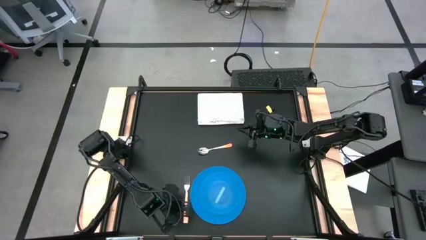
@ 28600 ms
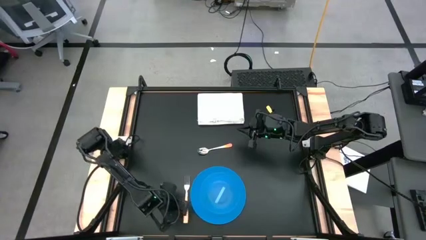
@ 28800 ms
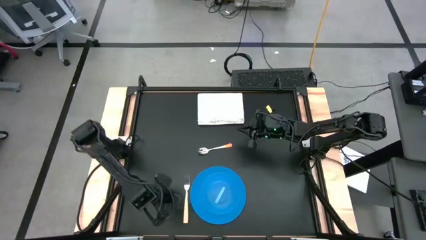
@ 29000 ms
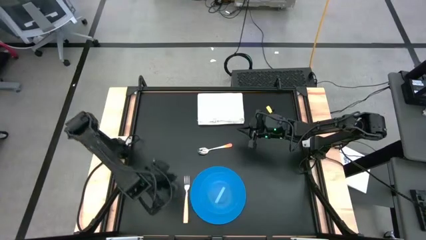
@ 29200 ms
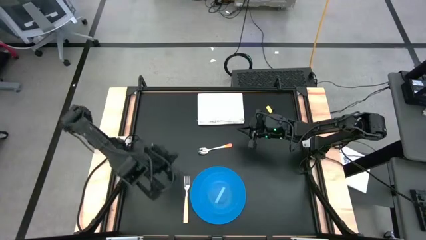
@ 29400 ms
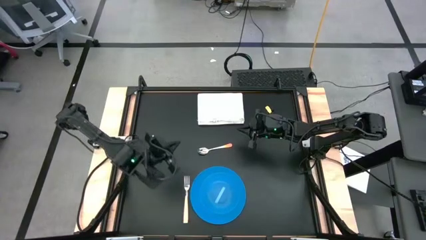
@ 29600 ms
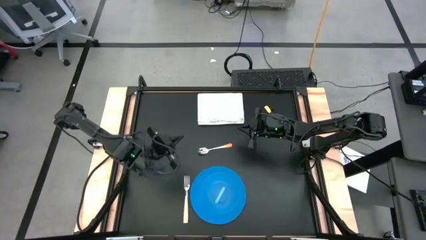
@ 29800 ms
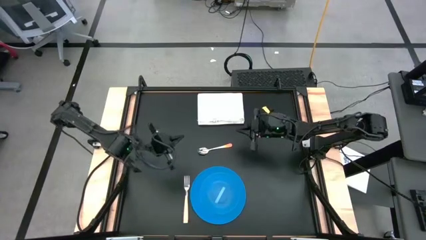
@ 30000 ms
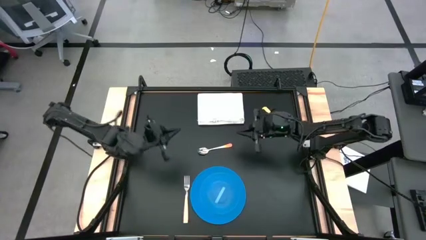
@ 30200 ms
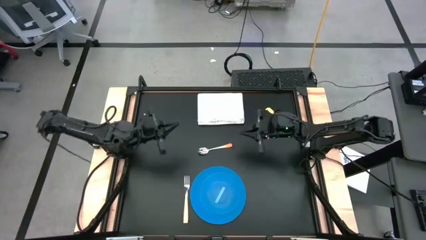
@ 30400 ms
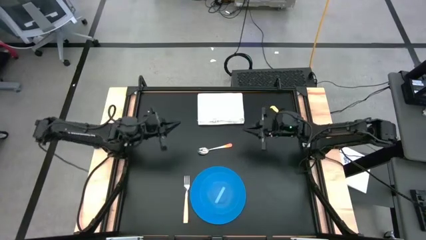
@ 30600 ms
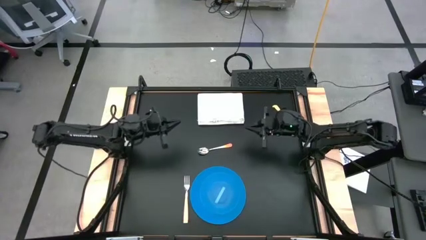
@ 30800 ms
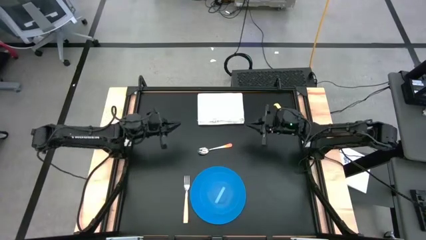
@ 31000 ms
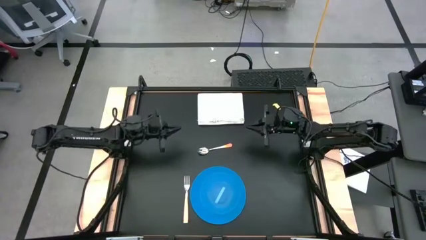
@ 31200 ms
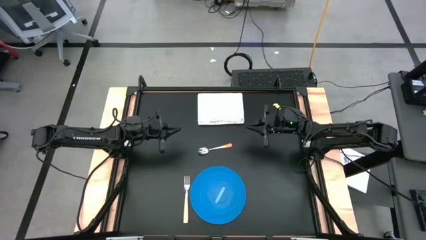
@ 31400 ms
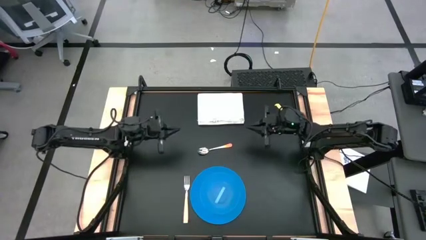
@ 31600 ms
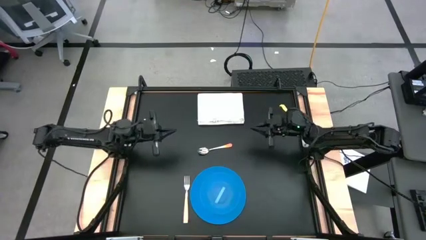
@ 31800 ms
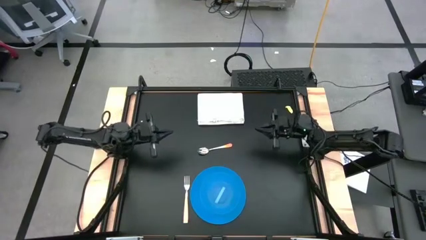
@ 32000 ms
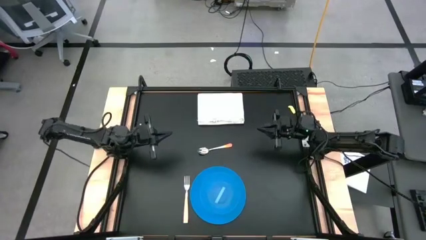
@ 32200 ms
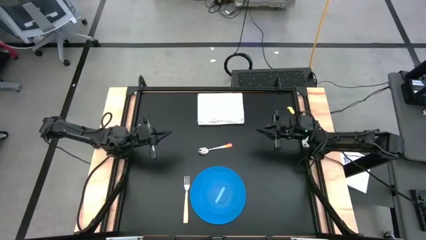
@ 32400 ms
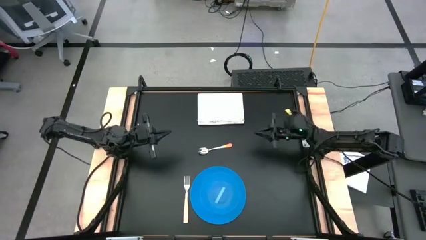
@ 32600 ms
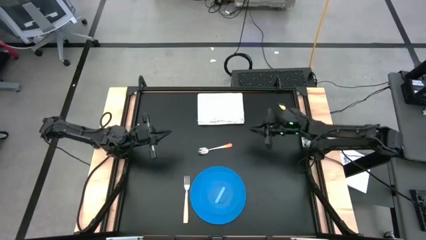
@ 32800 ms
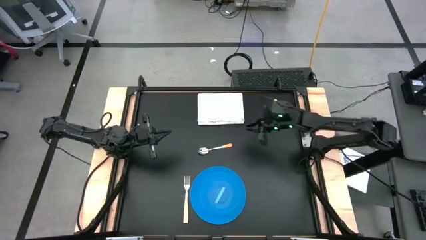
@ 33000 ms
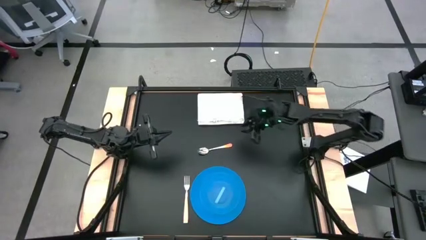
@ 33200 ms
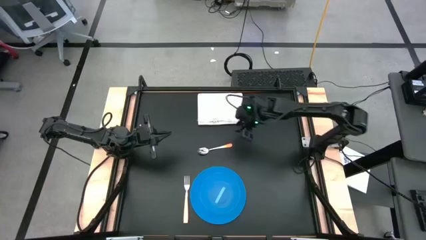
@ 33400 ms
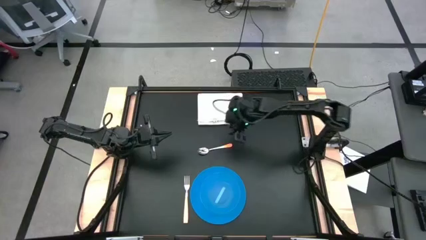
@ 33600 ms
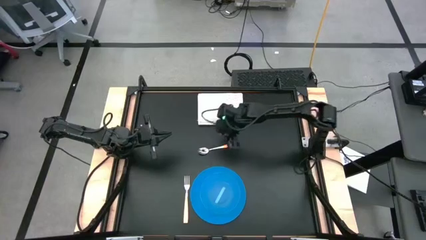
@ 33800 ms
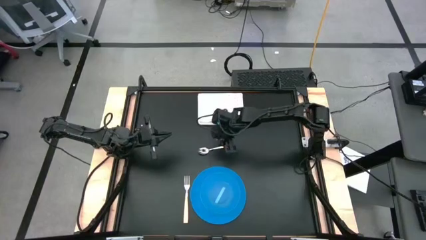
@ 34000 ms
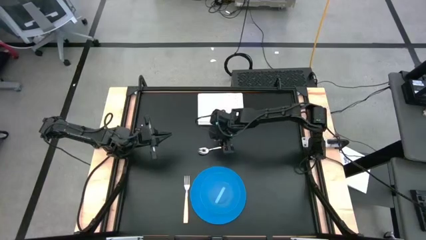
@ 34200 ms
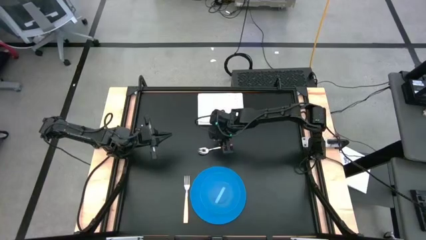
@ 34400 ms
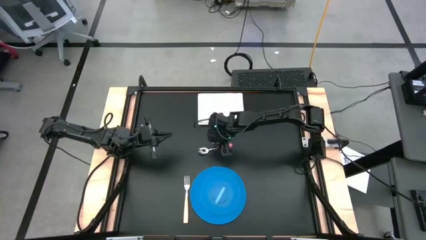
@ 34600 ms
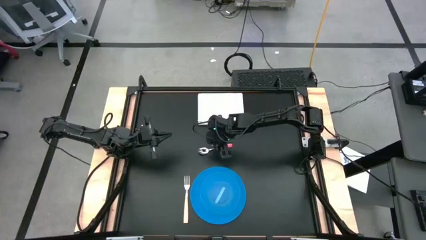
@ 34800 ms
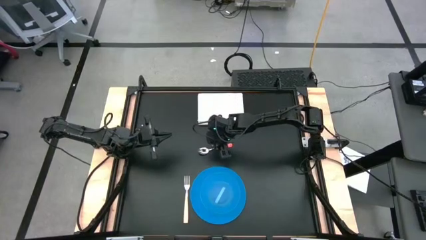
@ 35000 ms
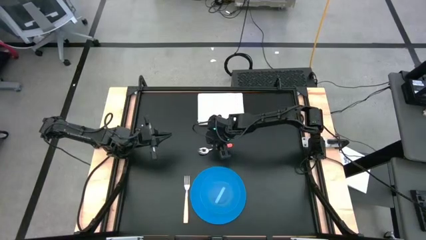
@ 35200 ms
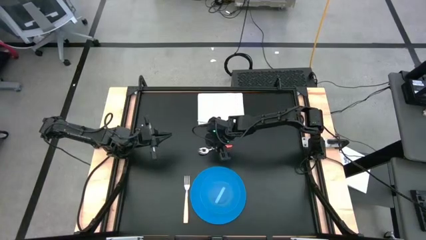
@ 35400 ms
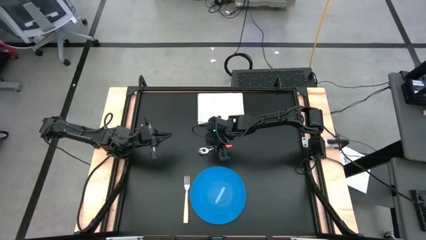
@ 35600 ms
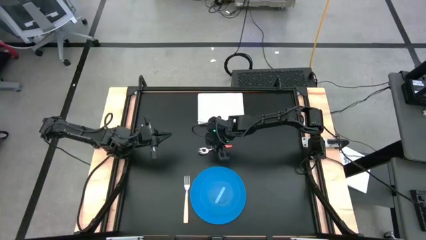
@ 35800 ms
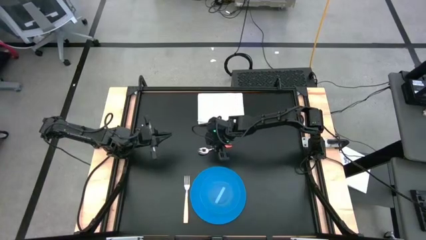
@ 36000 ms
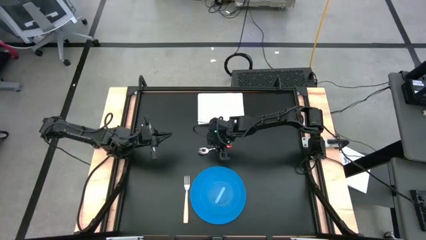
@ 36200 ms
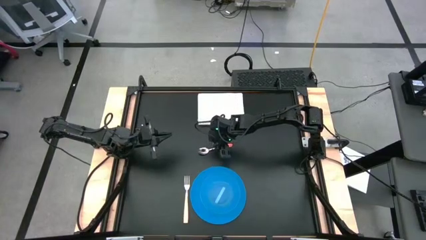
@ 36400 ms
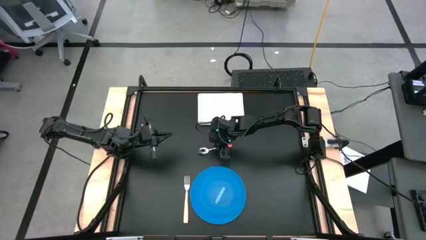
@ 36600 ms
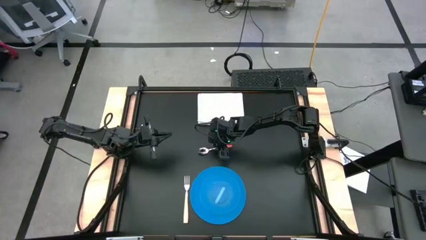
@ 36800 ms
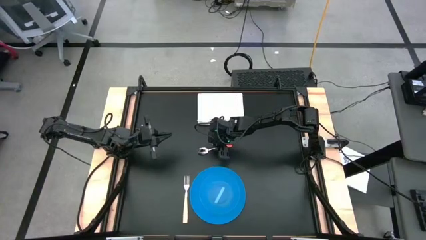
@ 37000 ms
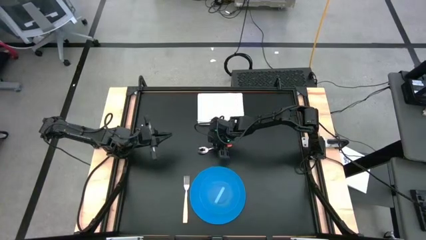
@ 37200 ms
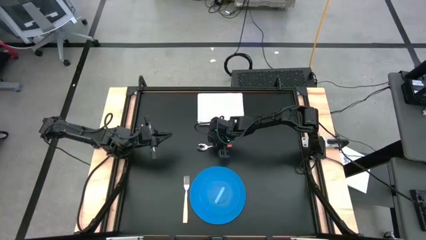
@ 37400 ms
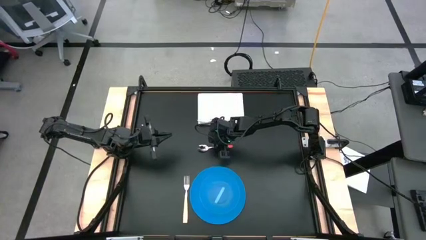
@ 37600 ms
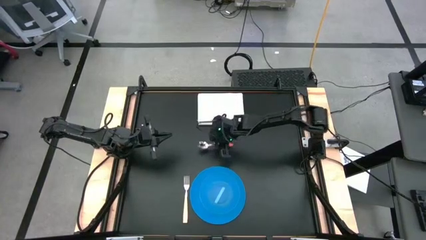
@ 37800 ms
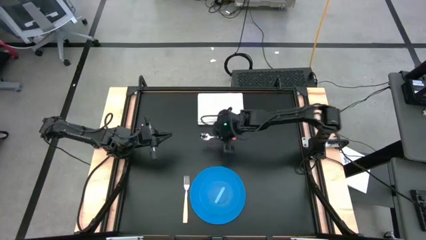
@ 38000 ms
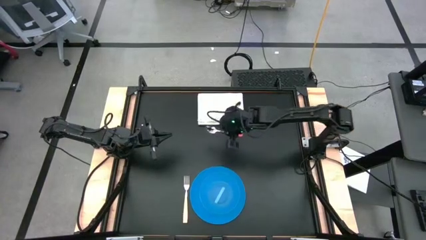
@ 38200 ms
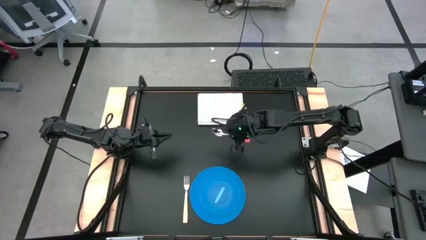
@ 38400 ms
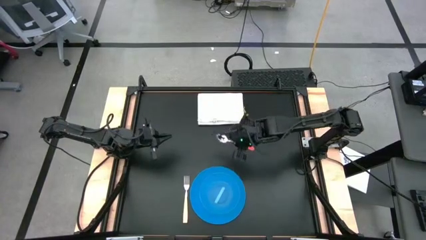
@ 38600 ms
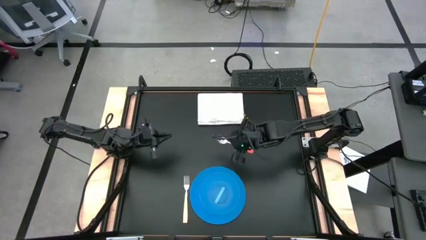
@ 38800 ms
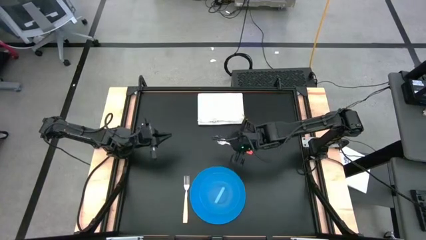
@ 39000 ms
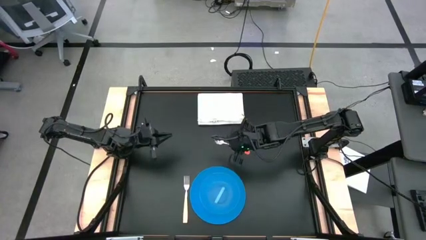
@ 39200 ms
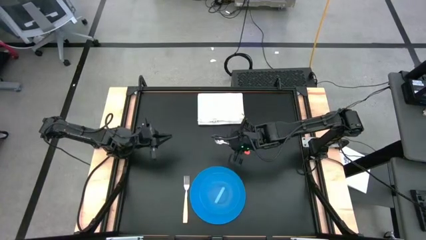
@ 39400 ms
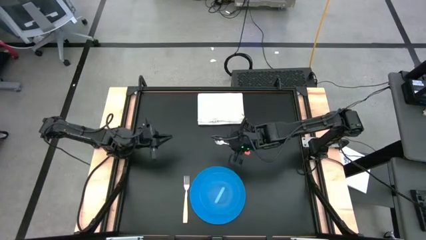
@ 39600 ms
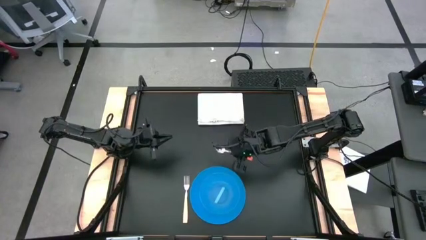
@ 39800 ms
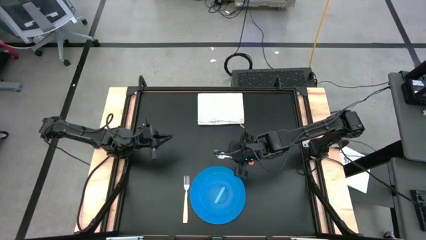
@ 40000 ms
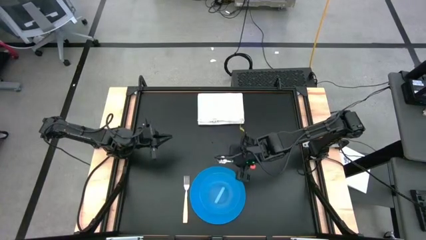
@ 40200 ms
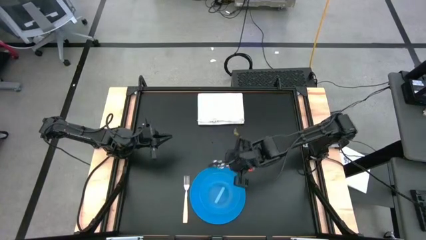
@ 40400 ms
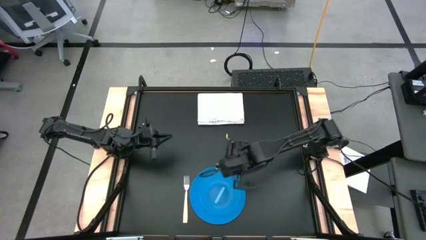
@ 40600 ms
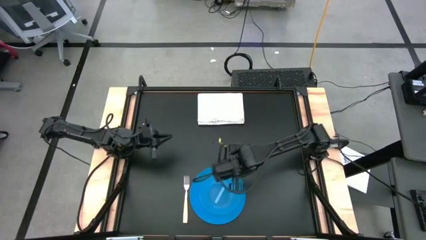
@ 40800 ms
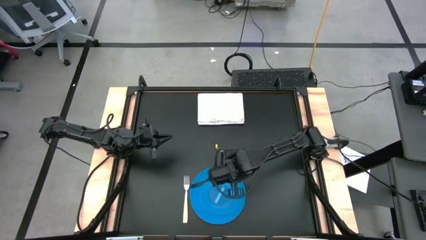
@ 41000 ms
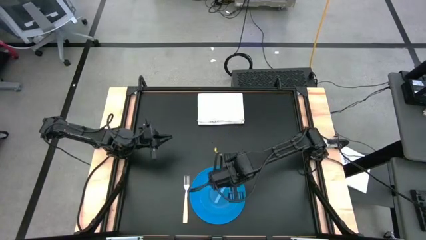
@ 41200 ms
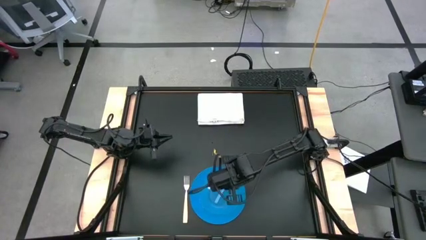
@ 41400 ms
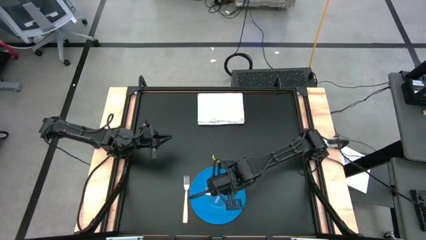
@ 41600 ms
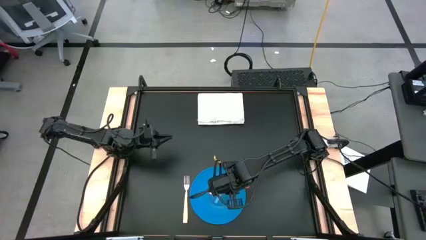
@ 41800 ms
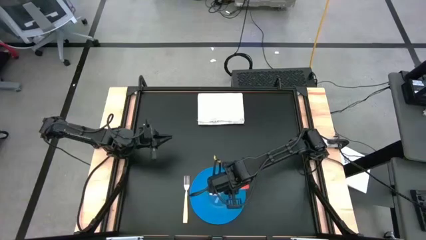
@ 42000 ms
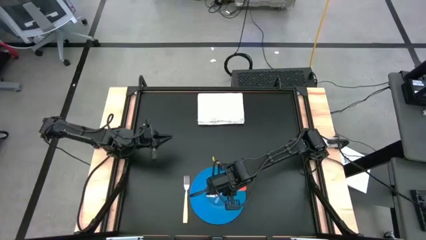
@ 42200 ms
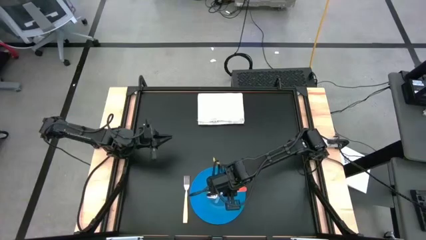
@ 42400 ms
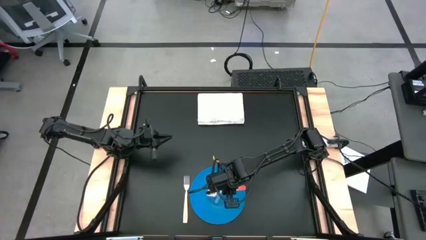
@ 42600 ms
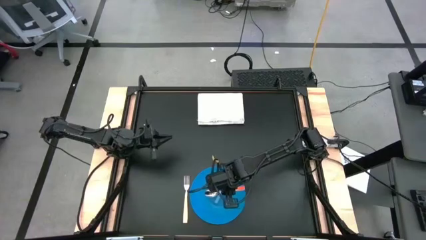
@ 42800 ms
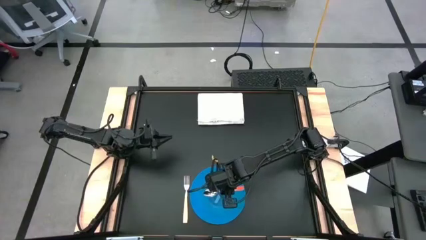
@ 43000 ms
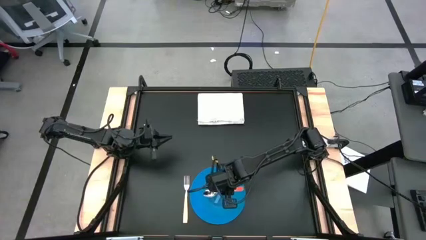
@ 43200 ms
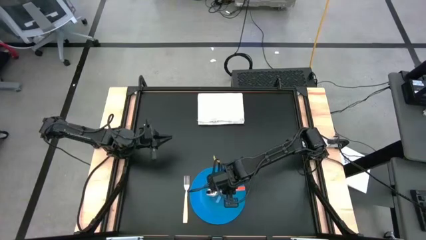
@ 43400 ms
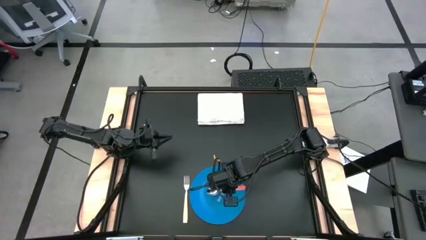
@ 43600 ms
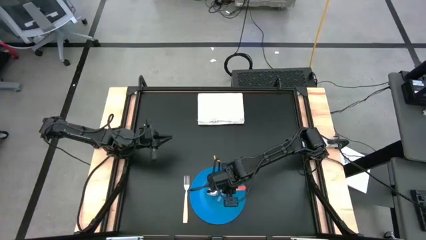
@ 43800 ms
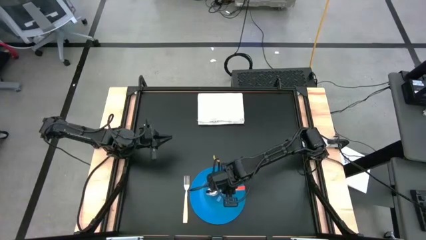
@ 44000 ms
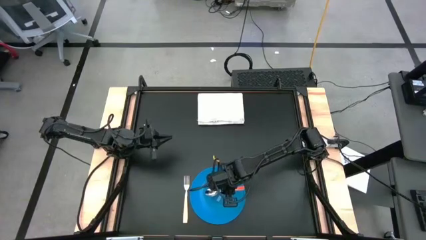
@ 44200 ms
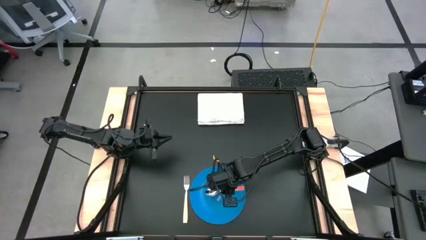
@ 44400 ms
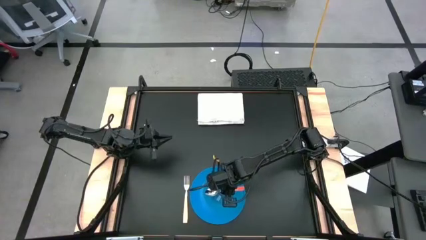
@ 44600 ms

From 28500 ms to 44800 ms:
Task: Set table place
Put the orange spoon into the blue bowl
